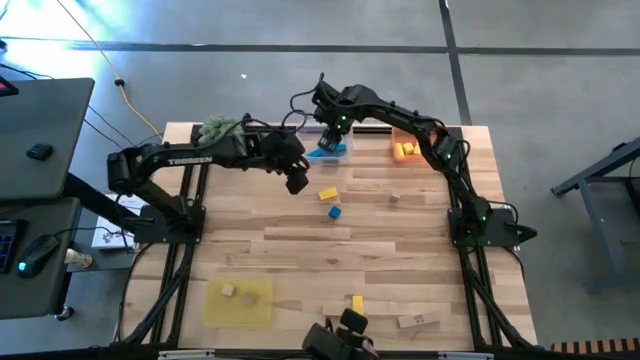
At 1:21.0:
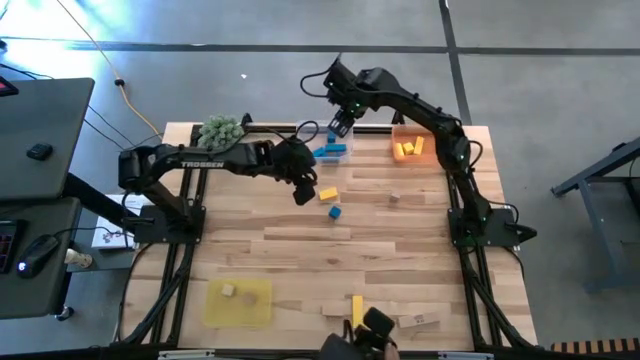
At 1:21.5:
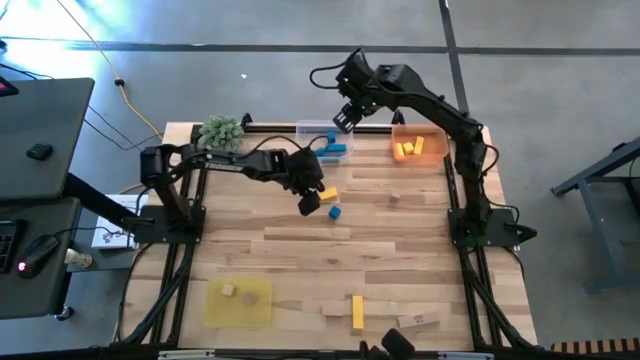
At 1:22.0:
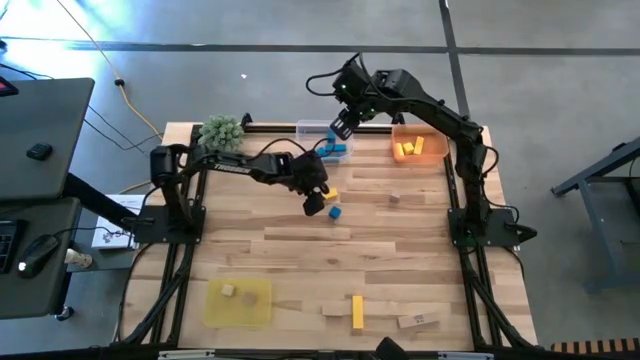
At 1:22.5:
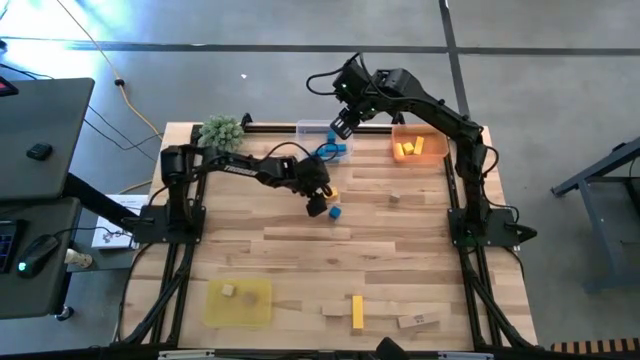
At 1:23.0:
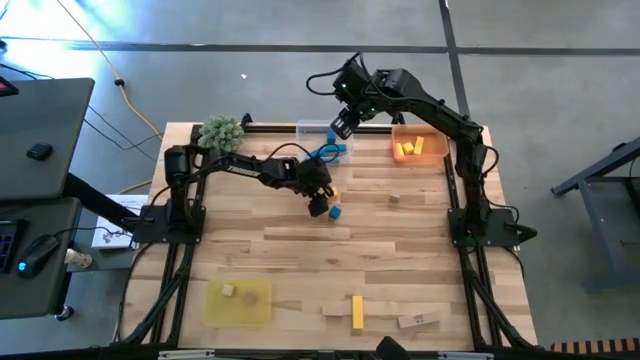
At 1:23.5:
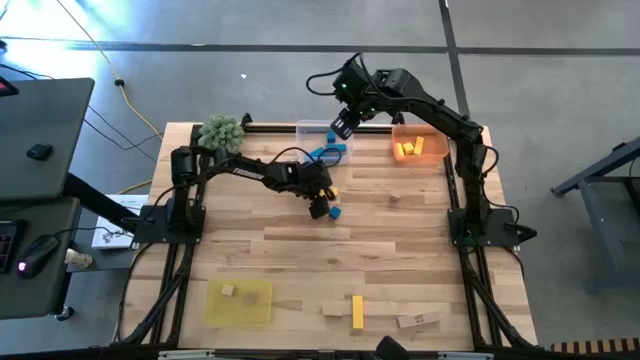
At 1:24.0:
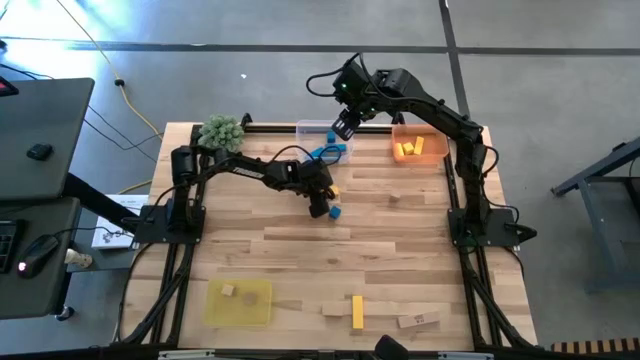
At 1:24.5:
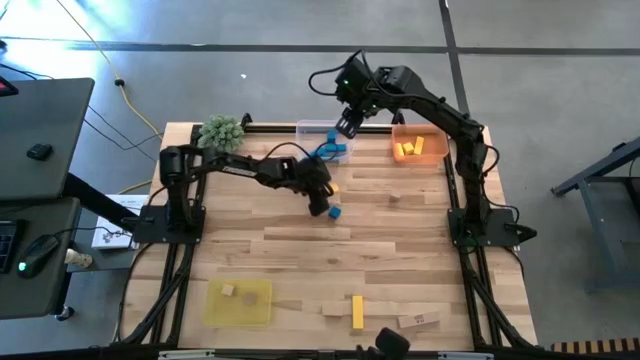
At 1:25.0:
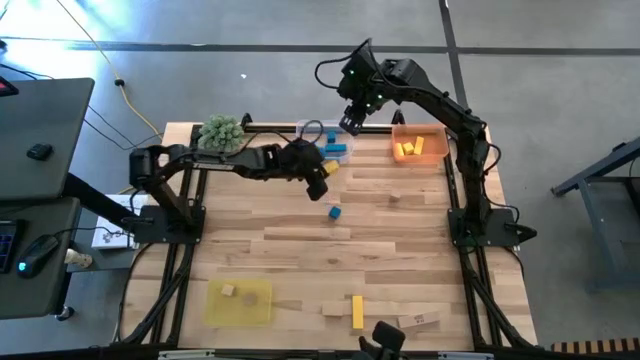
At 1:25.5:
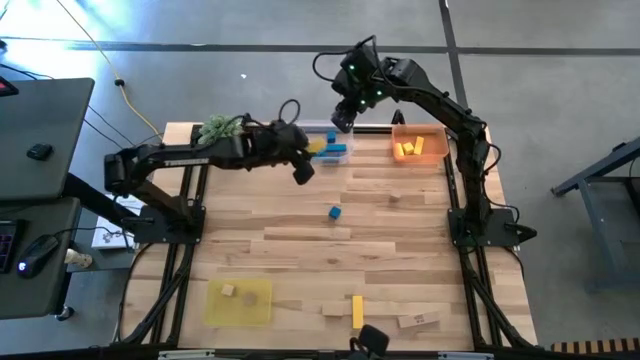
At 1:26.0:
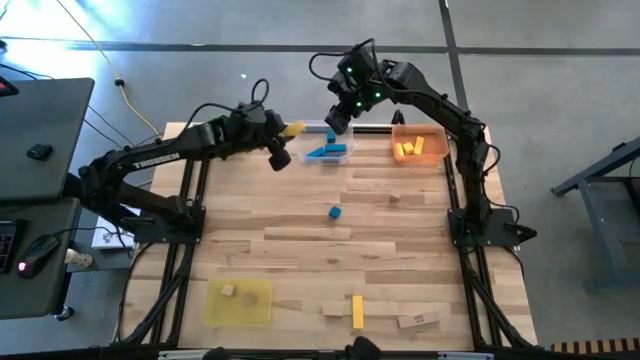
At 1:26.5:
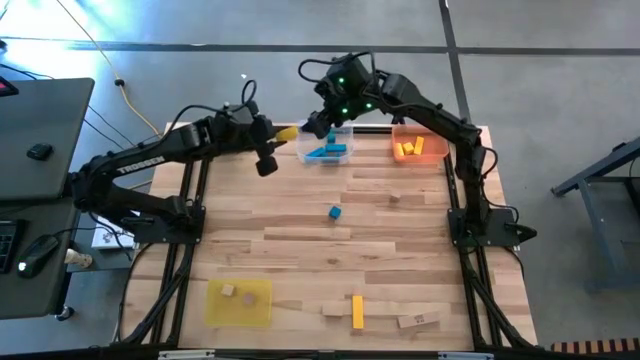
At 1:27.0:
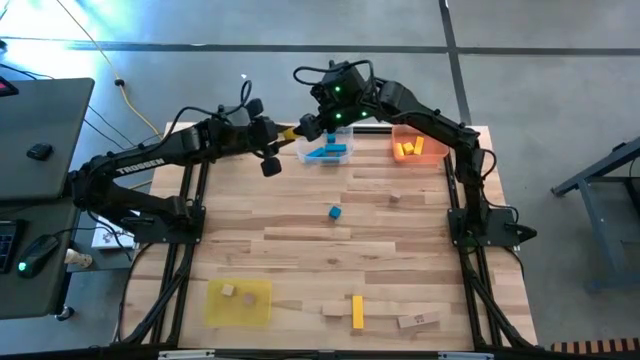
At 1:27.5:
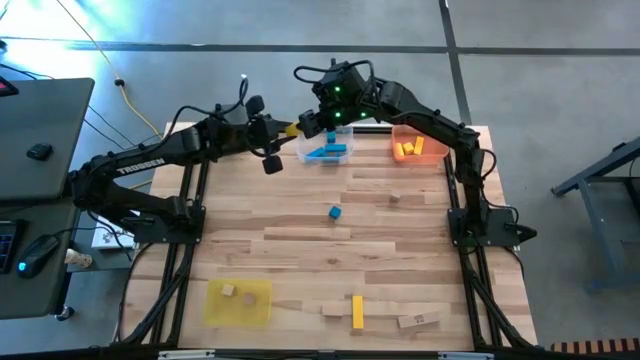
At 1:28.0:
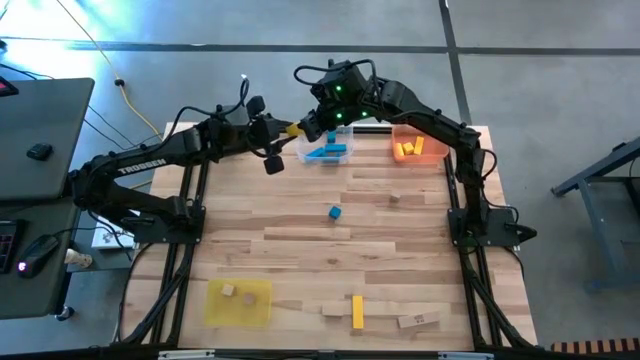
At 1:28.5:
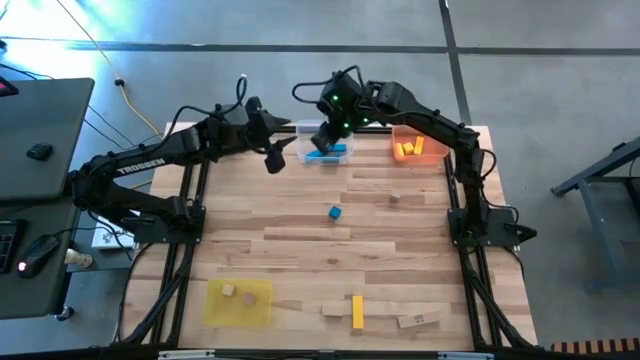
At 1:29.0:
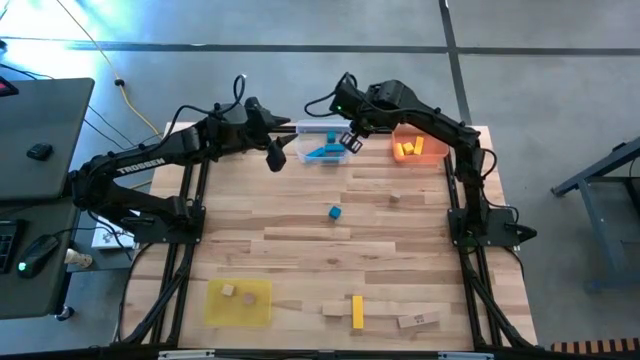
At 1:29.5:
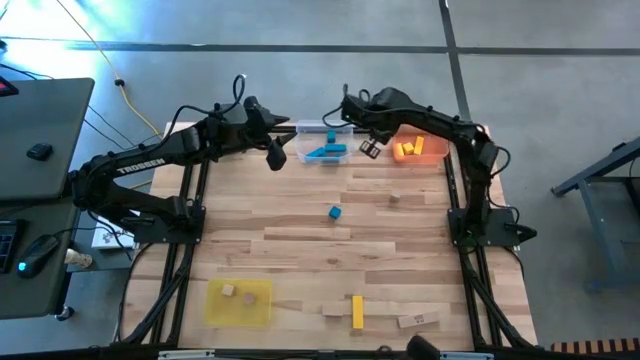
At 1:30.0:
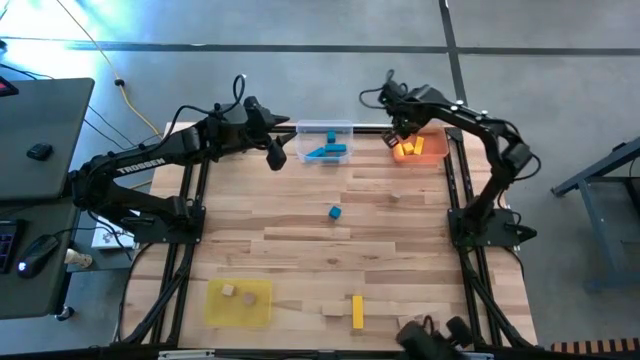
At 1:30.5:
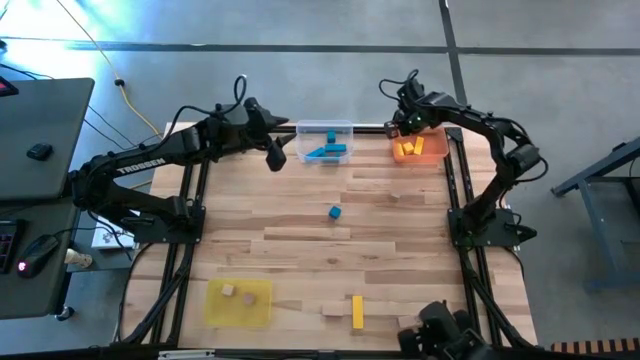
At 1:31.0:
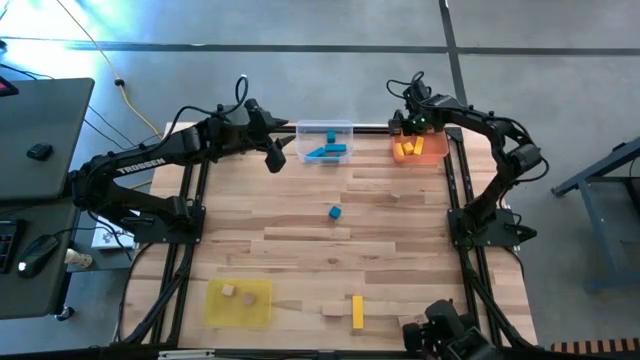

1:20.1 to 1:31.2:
Task: Sort & place blocks by color
Put the yellow block into the orange bin

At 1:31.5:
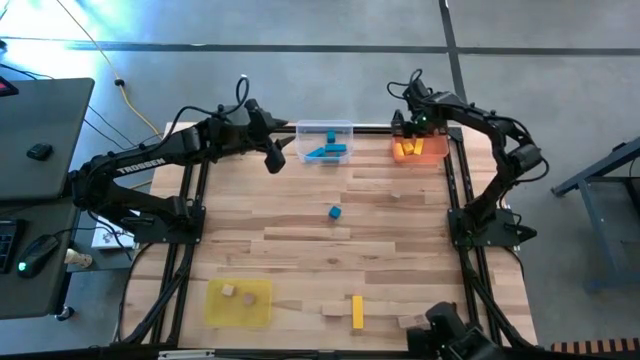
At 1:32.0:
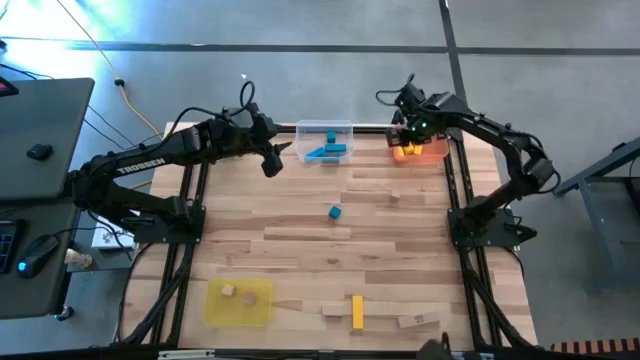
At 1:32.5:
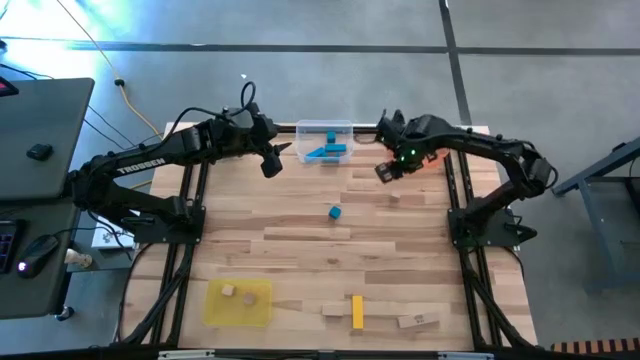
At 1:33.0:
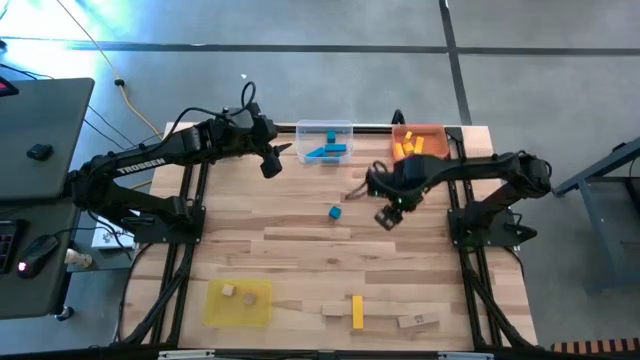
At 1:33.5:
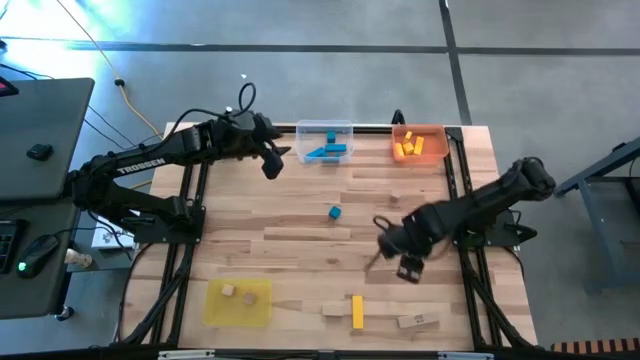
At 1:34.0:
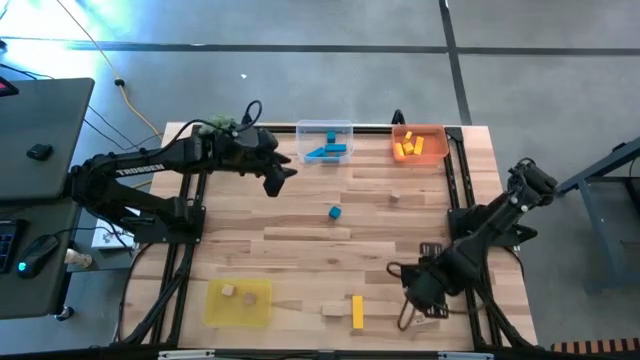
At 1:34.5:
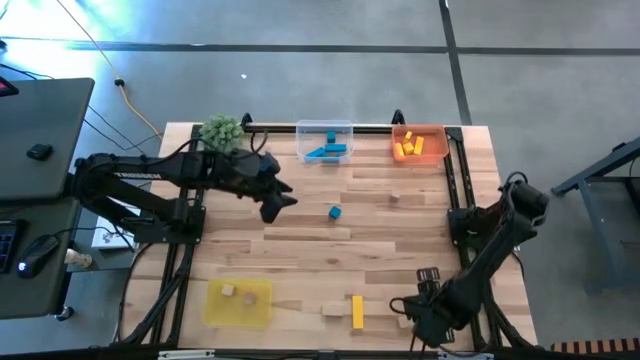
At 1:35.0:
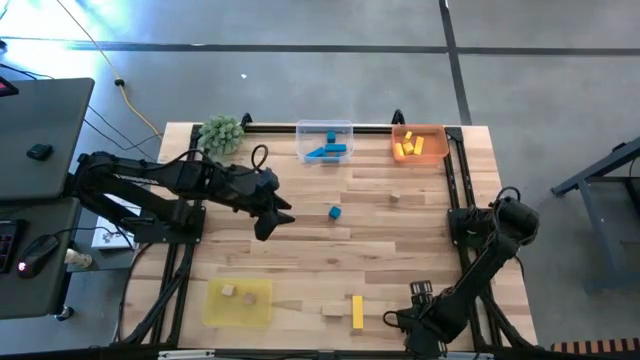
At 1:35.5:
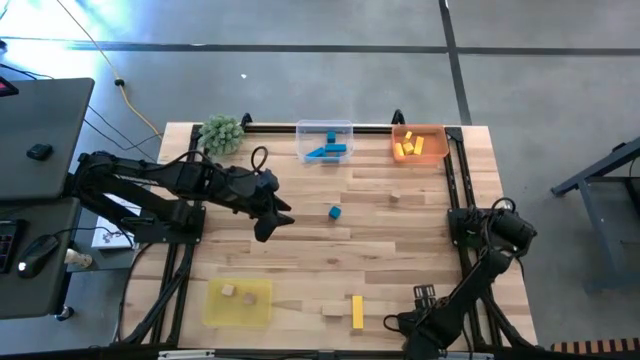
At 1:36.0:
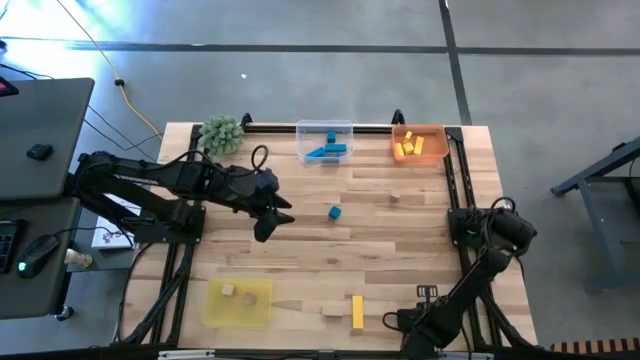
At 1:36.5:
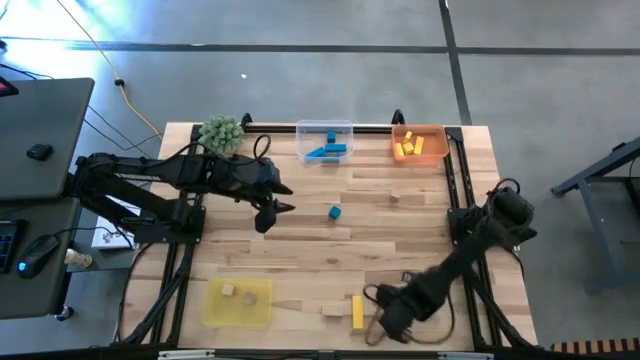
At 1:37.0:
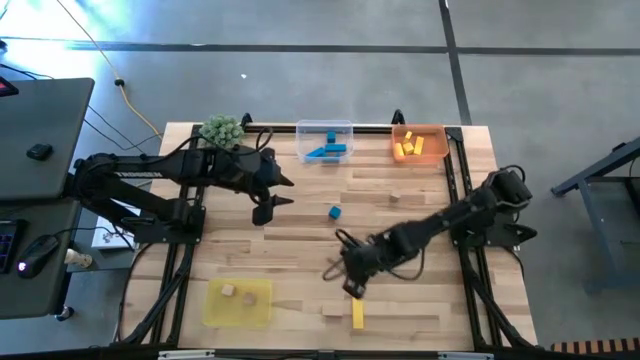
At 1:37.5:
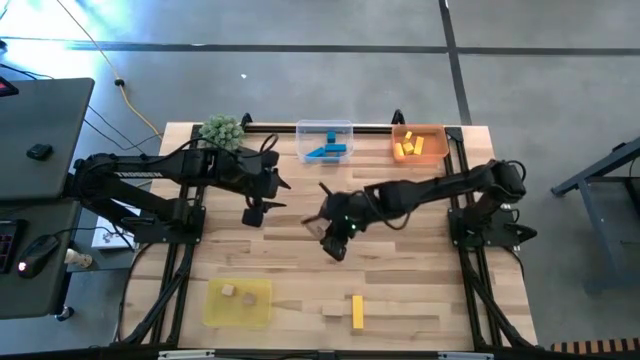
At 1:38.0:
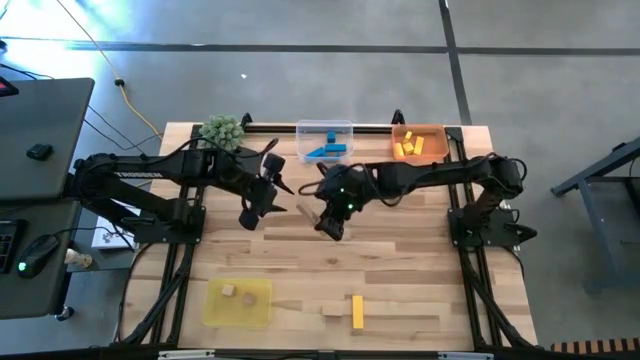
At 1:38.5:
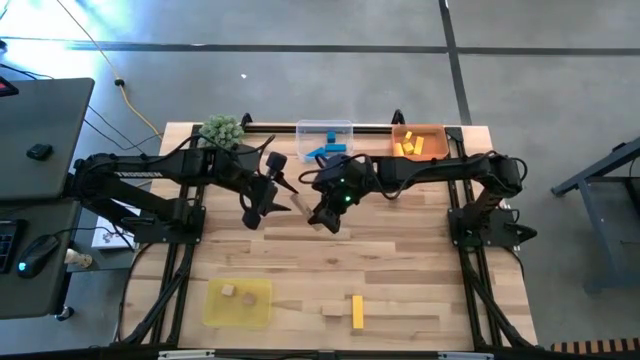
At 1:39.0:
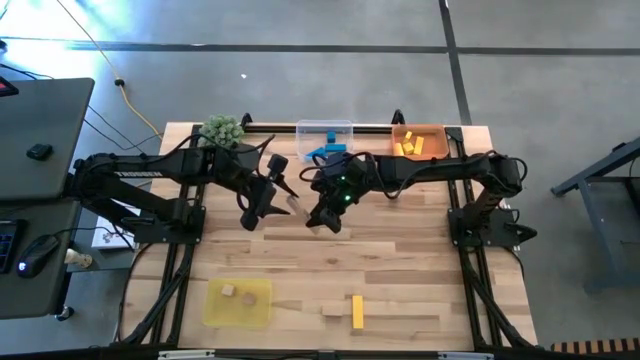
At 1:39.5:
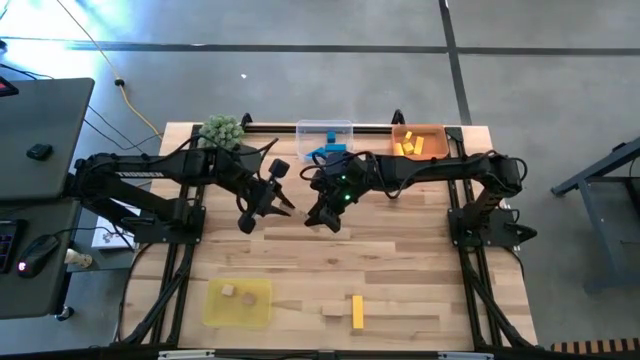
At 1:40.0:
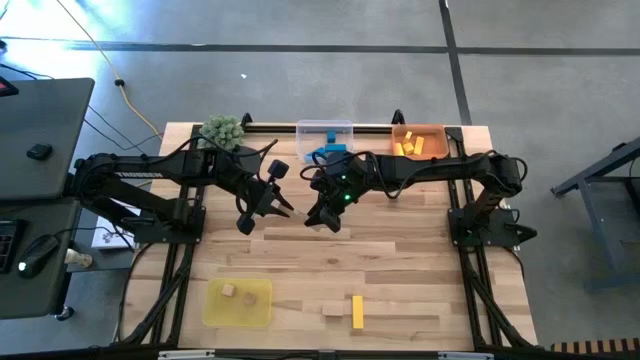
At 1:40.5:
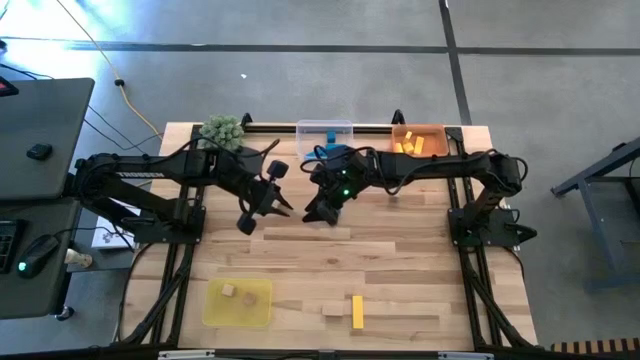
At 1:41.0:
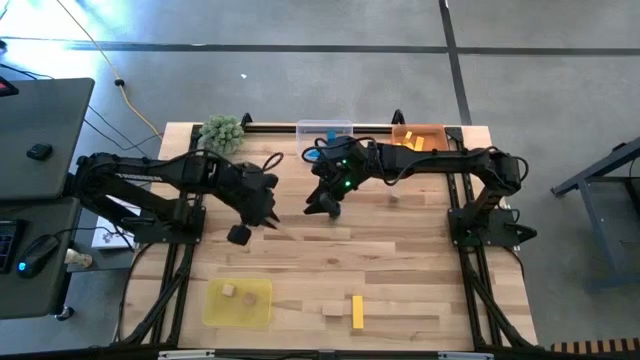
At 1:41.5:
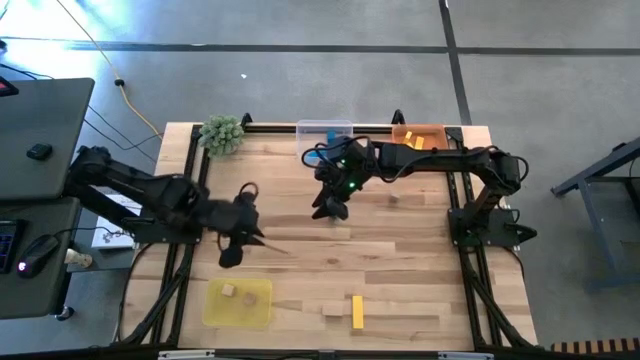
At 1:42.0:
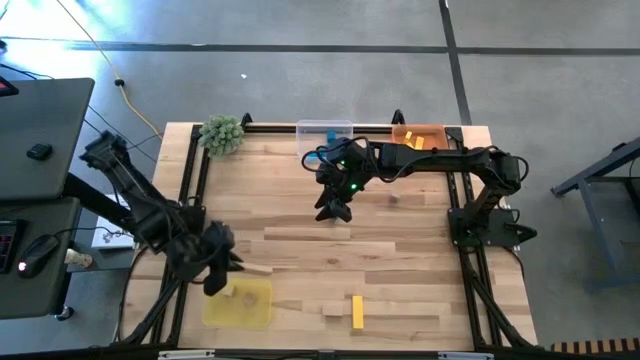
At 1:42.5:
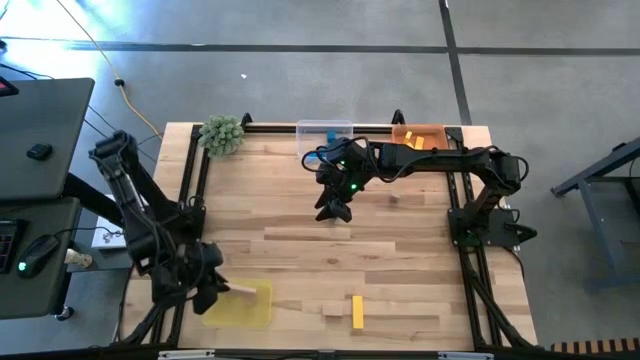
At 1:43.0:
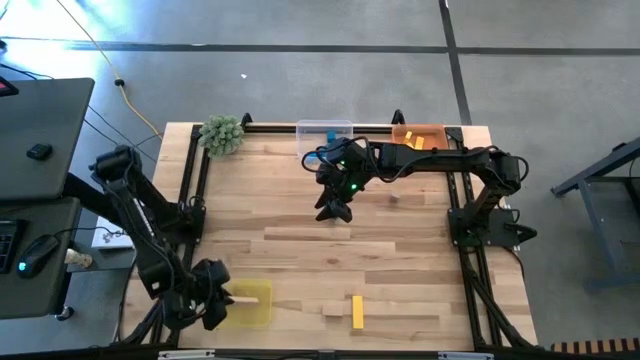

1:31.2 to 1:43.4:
Put the brown block into the yellow bin
